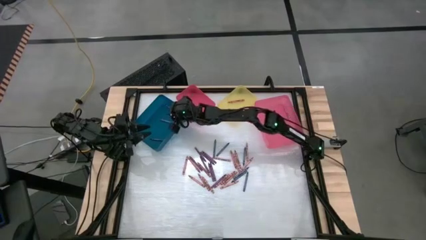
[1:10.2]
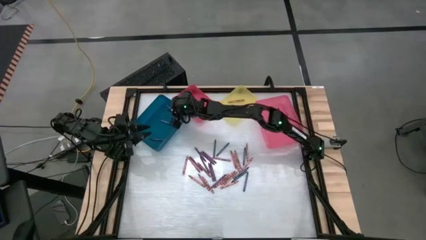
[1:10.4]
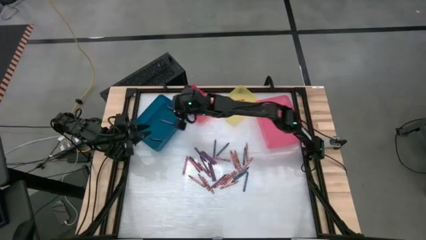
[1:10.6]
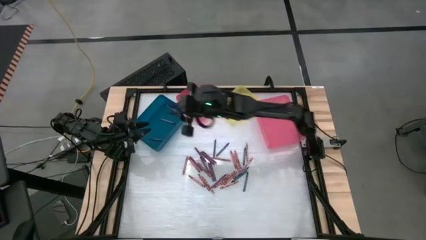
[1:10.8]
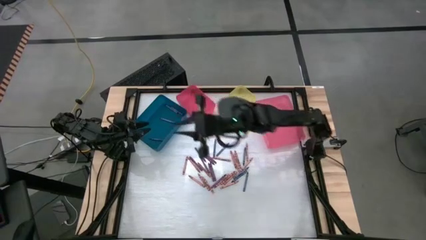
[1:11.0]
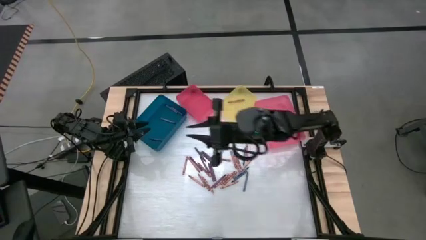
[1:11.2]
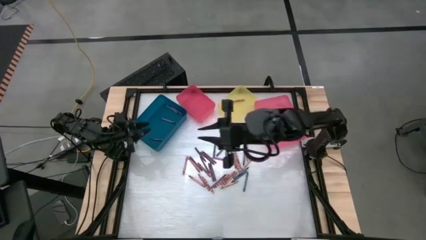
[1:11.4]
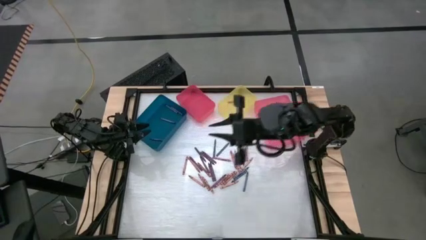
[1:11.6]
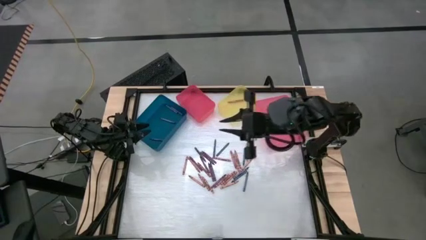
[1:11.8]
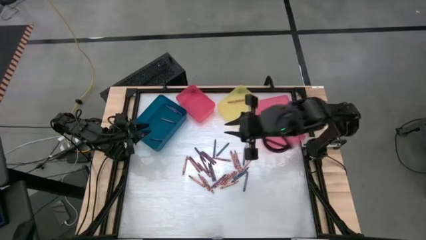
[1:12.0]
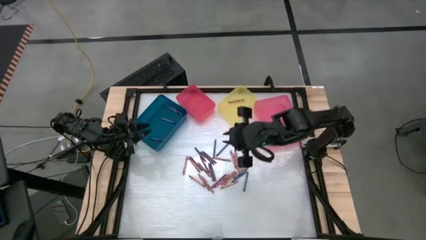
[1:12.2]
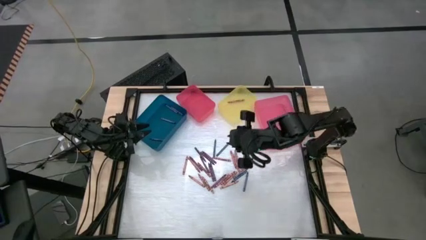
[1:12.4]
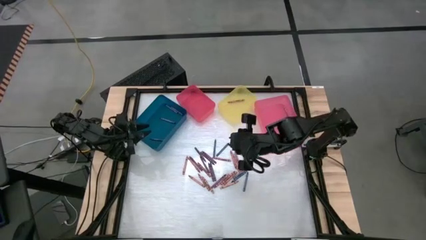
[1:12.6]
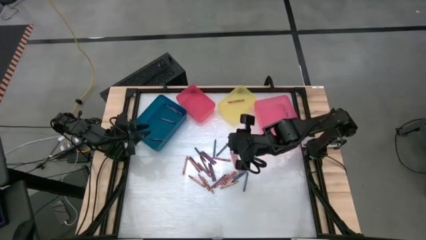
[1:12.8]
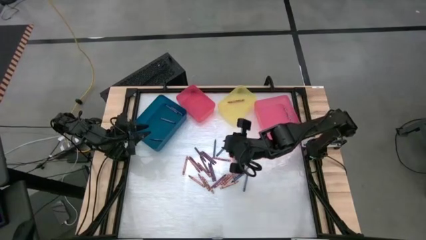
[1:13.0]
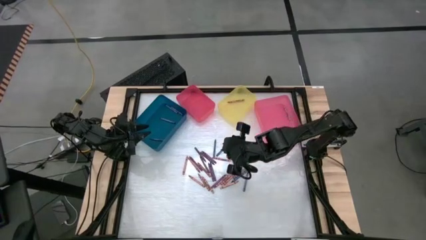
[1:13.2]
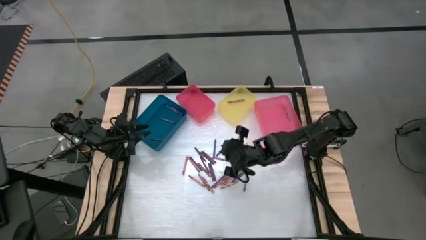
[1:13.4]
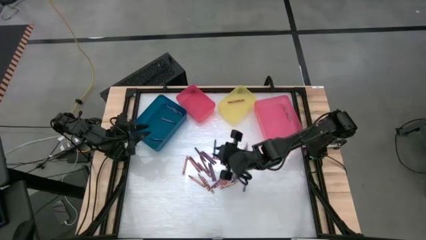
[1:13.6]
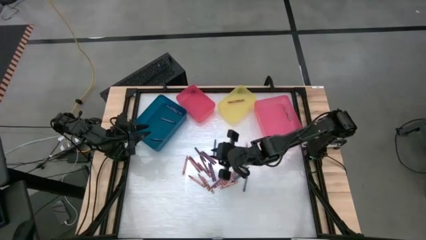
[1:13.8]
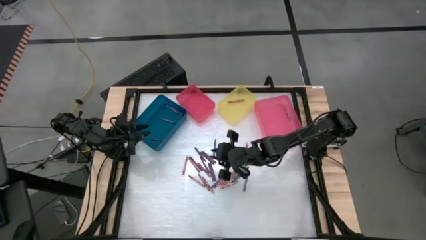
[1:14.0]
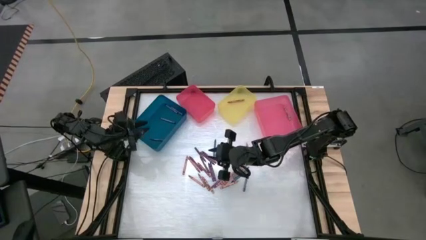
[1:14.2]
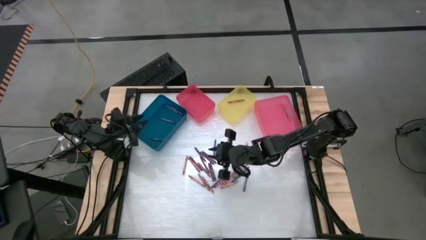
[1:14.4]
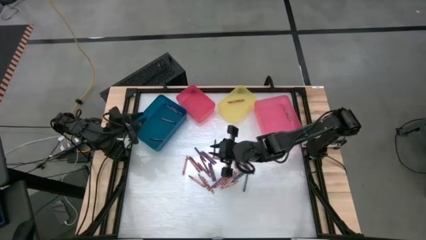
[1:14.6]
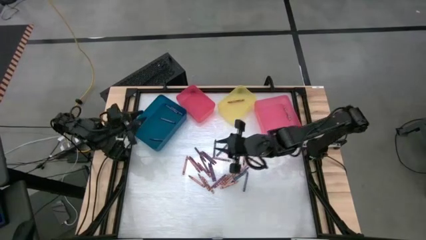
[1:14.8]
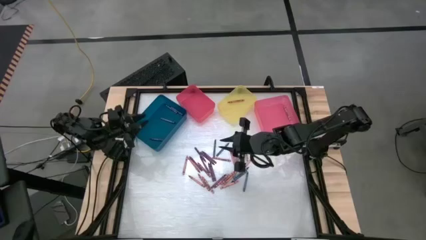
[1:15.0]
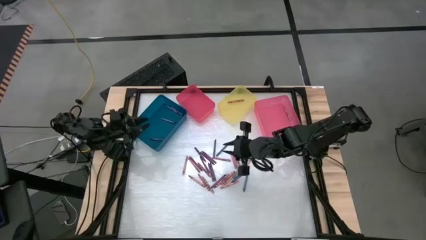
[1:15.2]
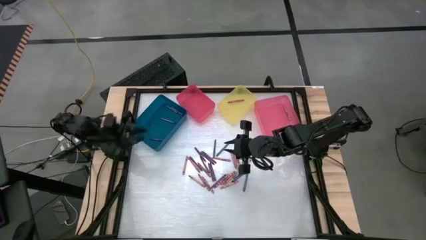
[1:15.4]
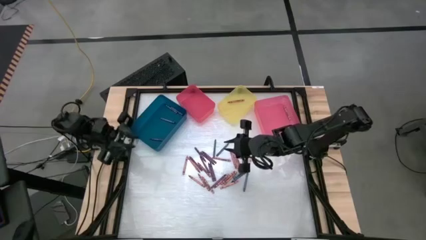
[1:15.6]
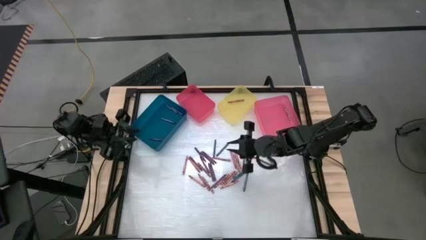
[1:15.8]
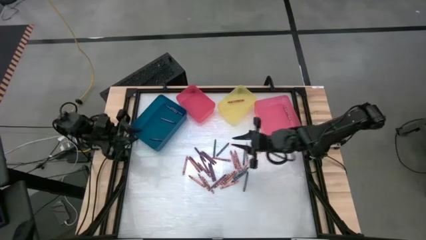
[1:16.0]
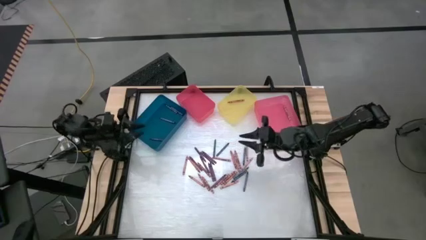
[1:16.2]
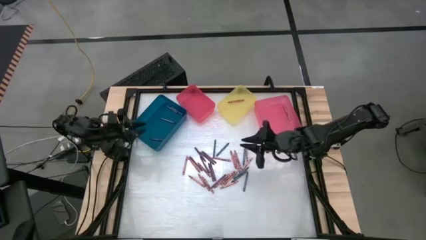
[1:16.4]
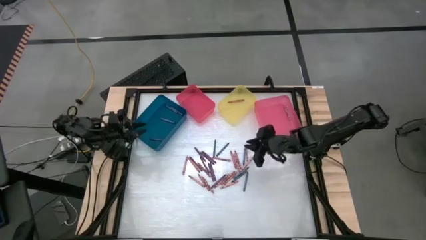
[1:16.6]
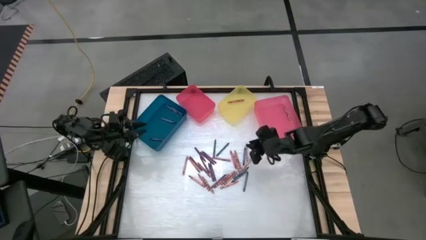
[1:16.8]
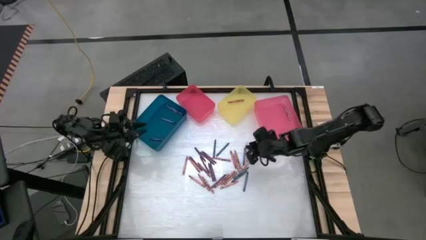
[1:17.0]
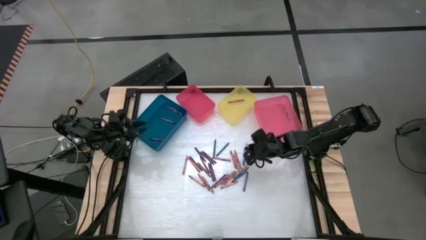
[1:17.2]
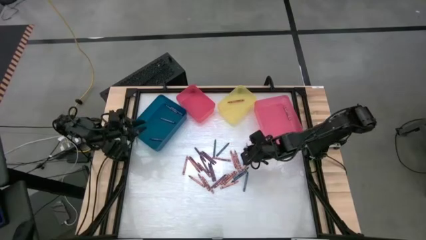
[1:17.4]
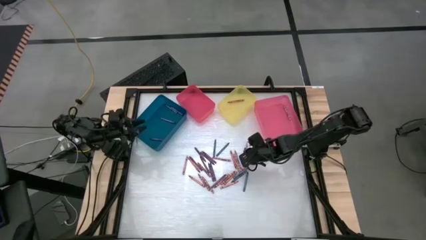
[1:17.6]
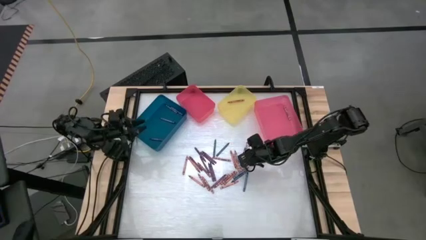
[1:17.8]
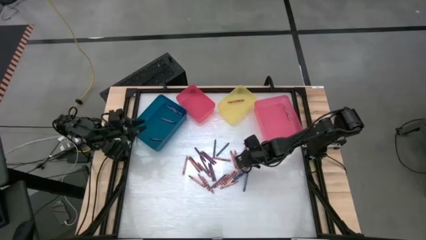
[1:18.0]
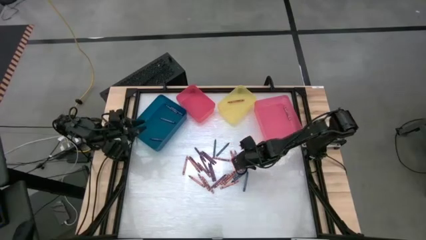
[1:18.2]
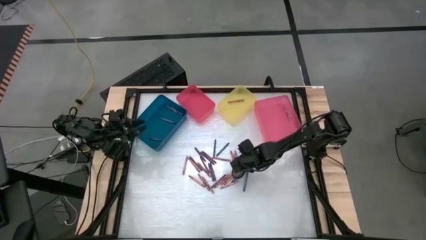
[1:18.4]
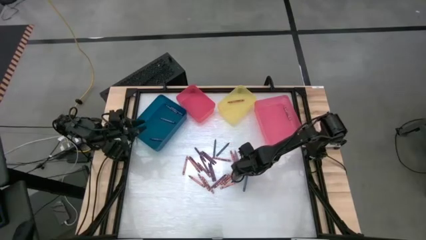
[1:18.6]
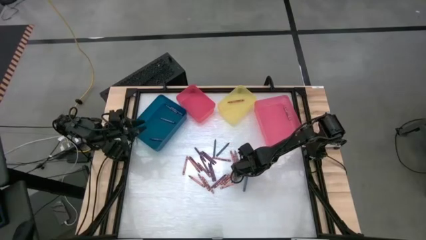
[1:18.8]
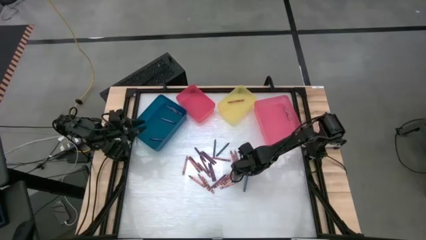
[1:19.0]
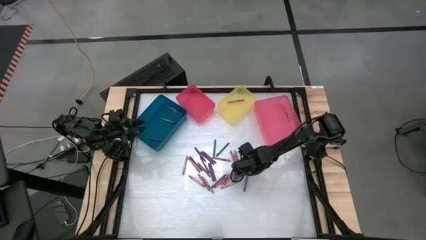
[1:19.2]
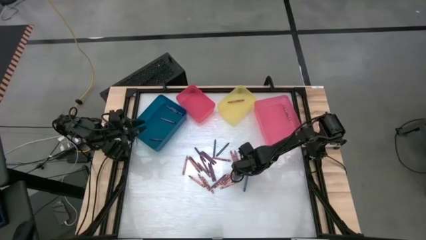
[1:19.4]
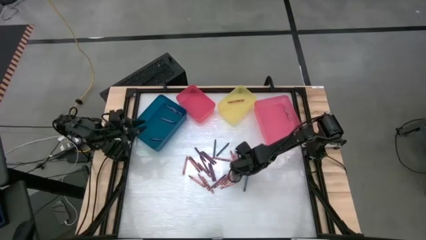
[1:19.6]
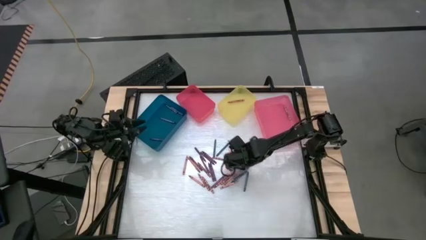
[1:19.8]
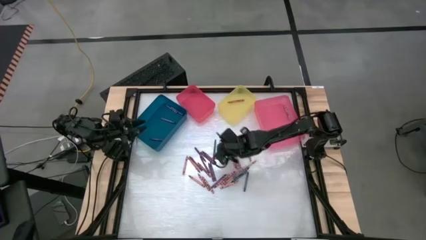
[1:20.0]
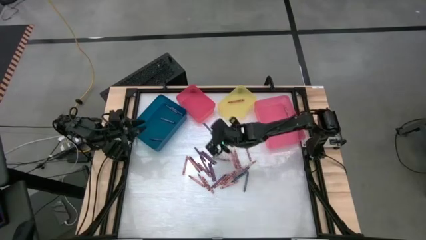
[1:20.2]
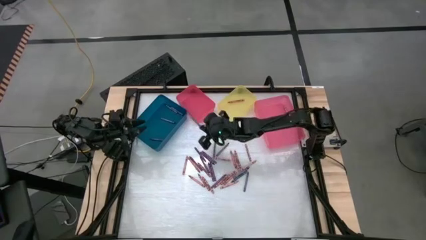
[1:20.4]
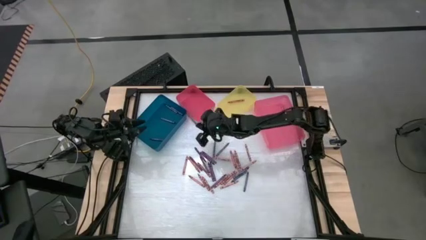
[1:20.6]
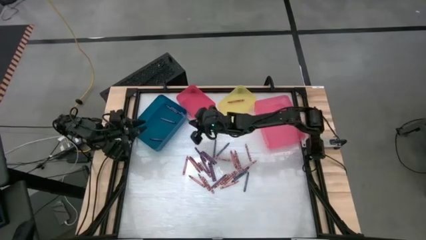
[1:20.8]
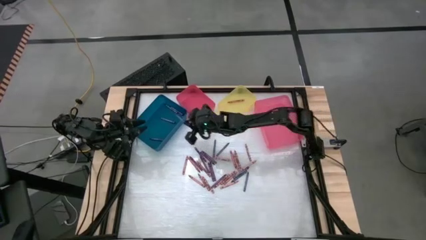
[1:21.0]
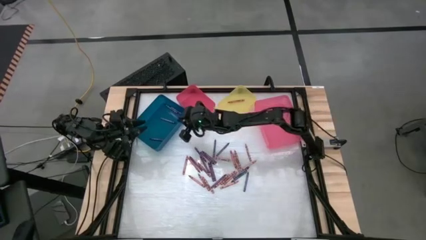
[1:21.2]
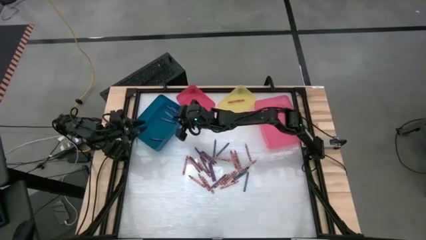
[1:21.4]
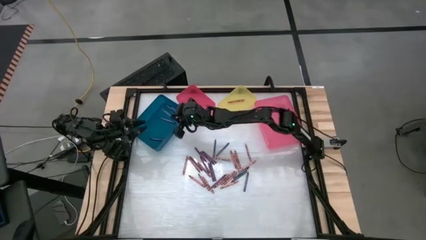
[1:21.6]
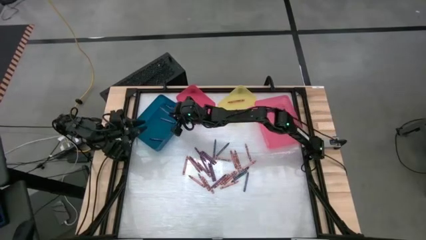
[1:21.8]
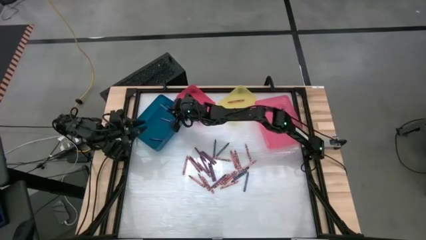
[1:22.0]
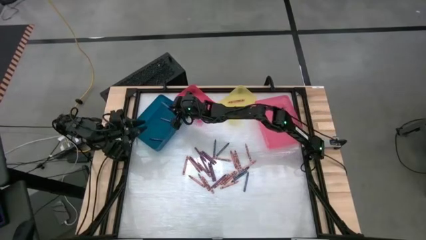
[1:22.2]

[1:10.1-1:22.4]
Task: Sort crayons
Put the blue crayon into the blue bin

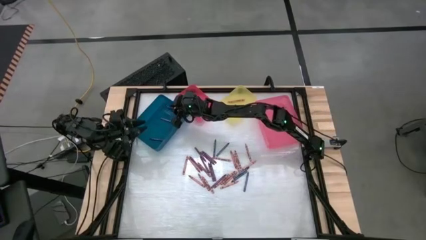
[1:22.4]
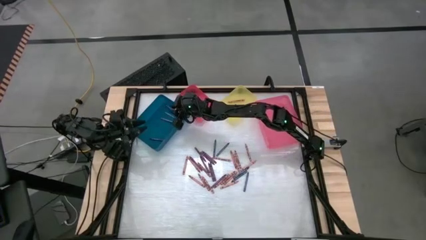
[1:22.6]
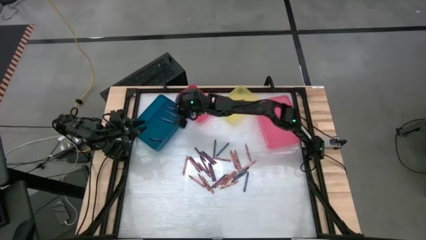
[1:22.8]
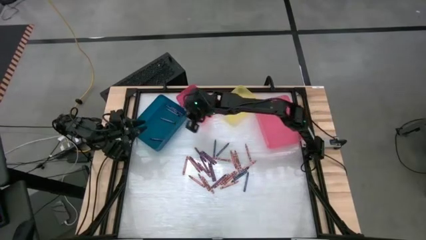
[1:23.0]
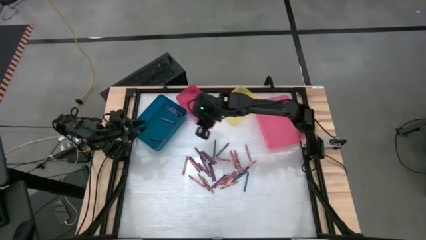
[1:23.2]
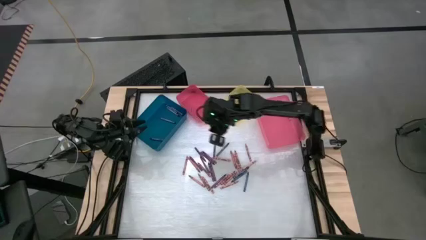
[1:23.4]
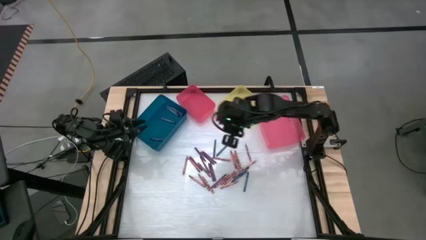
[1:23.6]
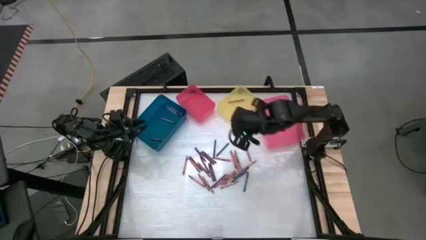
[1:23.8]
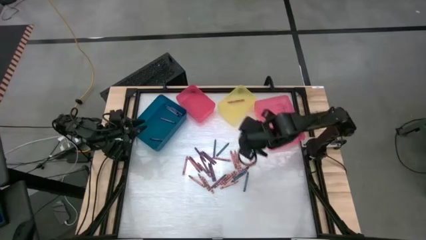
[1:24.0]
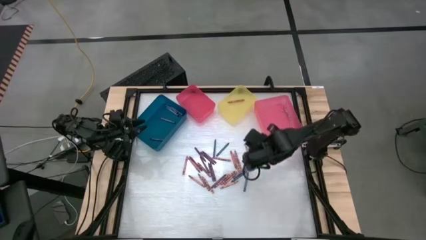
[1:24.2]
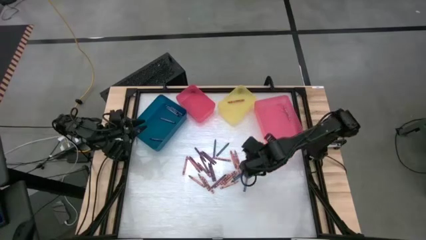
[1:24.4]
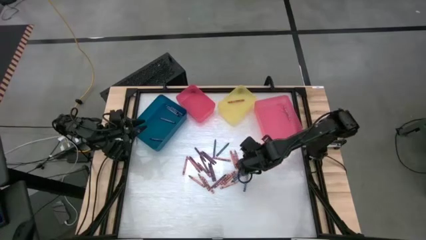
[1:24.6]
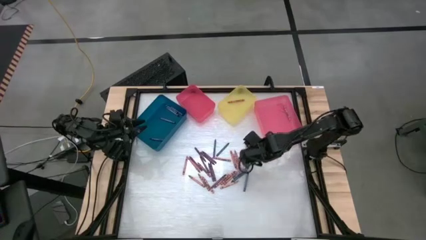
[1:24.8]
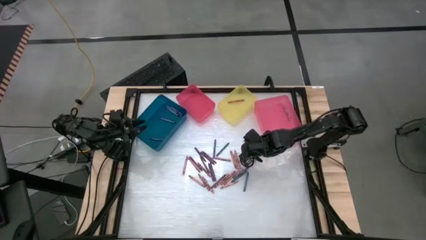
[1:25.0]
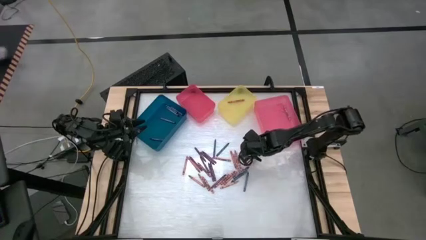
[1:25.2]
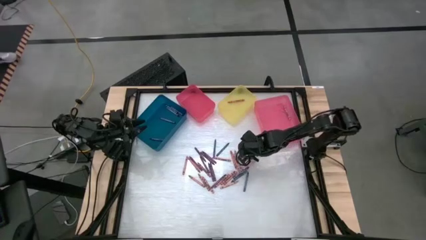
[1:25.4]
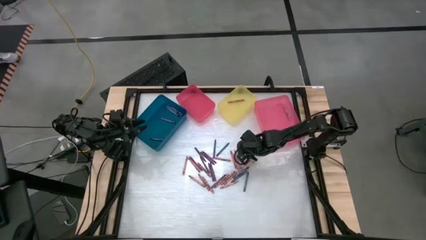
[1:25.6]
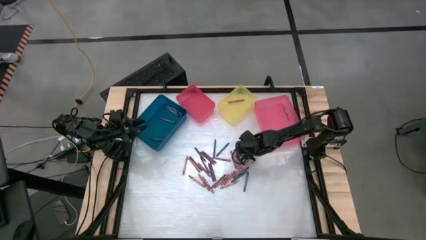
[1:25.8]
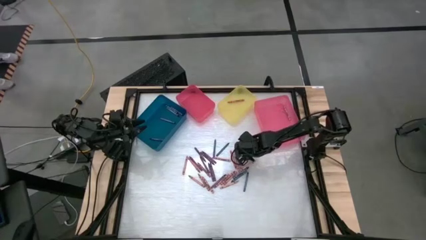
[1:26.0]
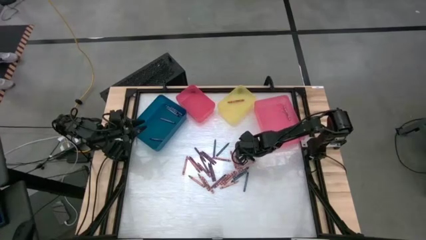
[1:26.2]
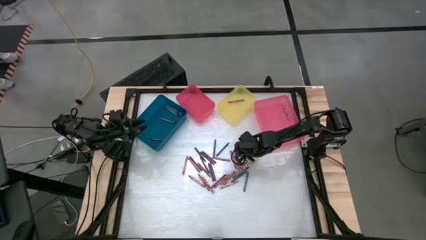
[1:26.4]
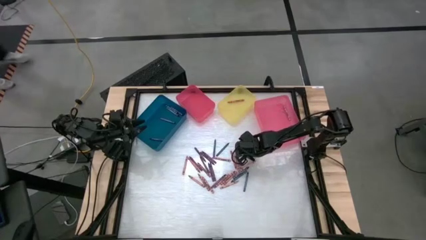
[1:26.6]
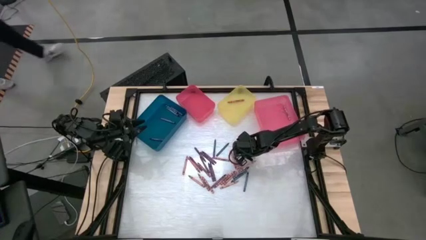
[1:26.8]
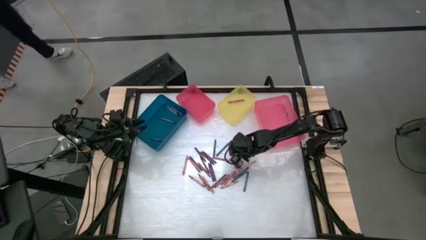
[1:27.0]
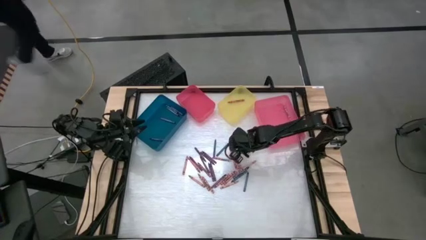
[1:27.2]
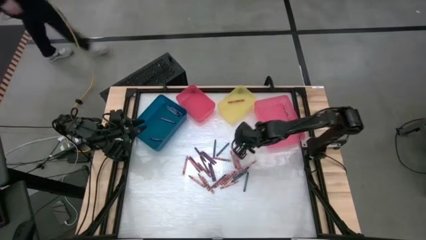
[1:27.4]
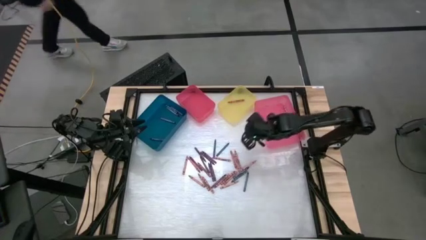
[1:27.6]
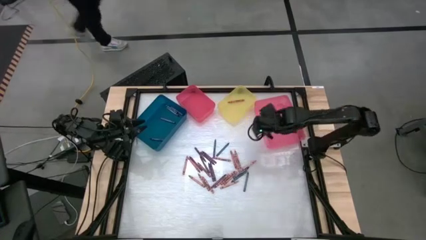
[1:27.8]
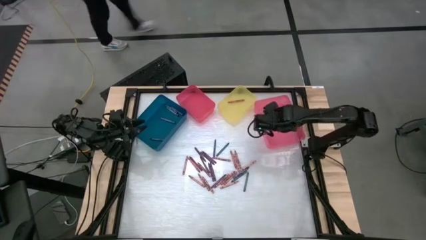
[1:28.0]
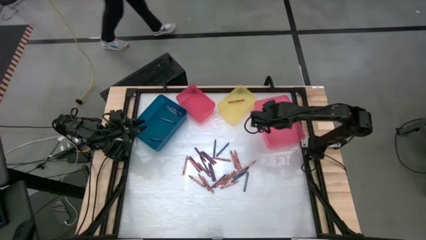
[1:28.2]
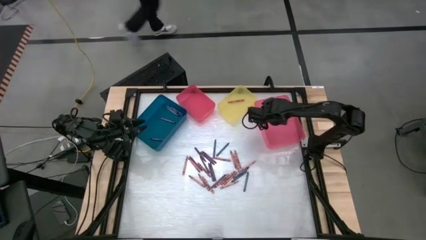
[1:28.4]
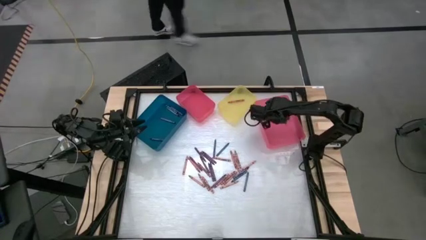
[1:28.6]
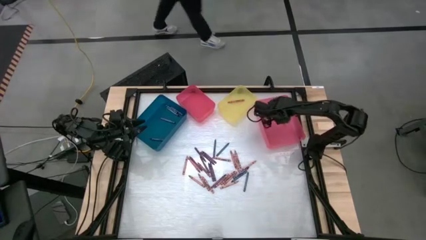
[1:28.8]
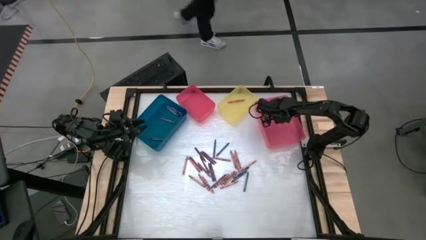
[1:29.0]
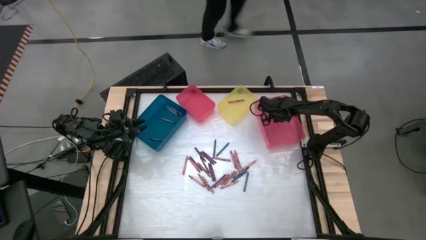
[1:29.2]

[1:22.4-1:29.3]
Put the pink crayon into the right pink bin
